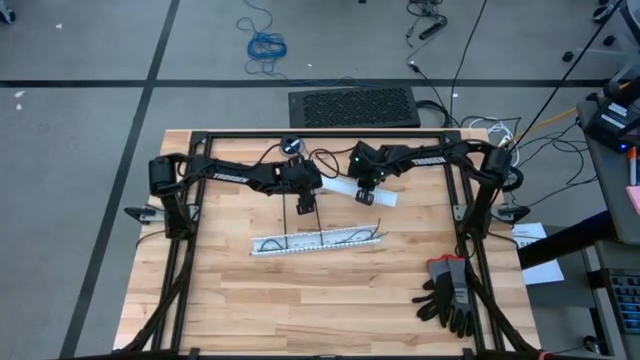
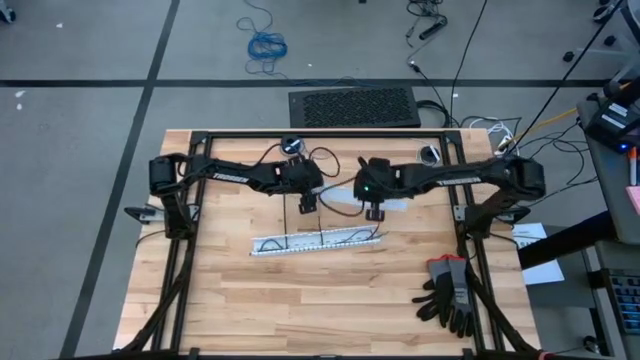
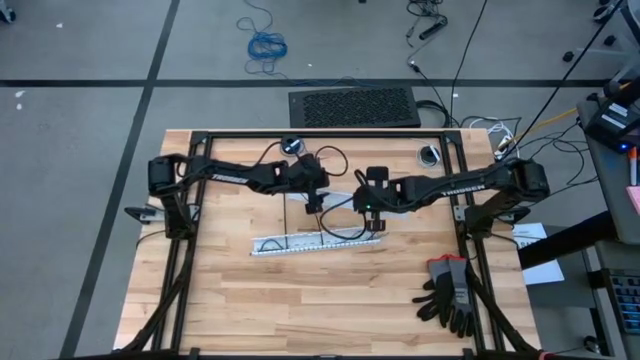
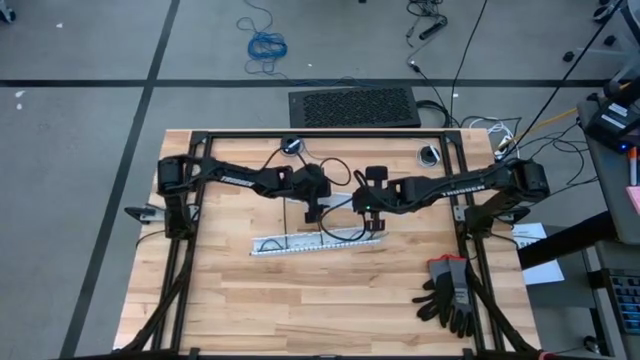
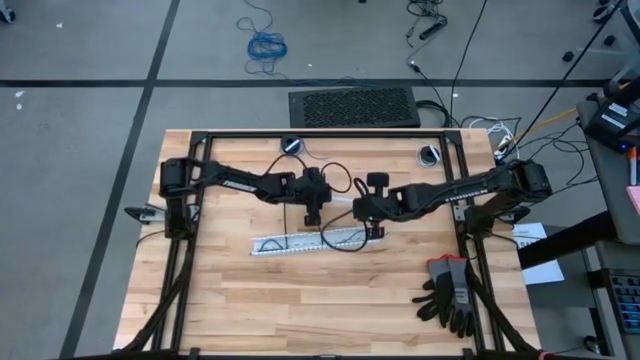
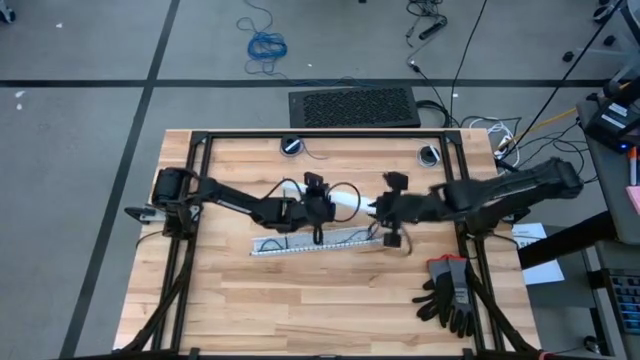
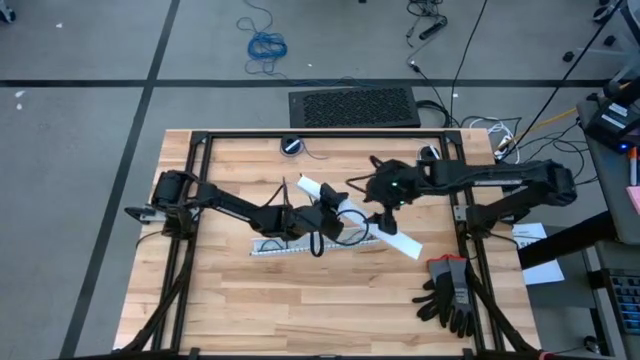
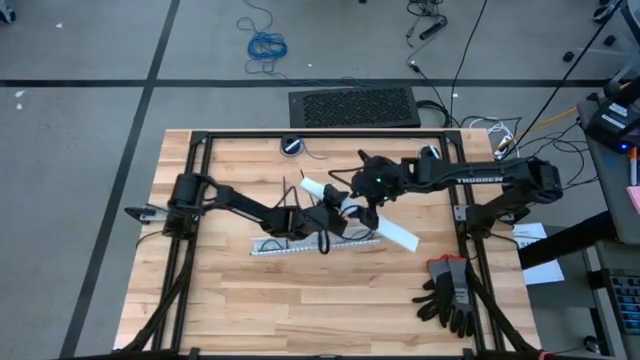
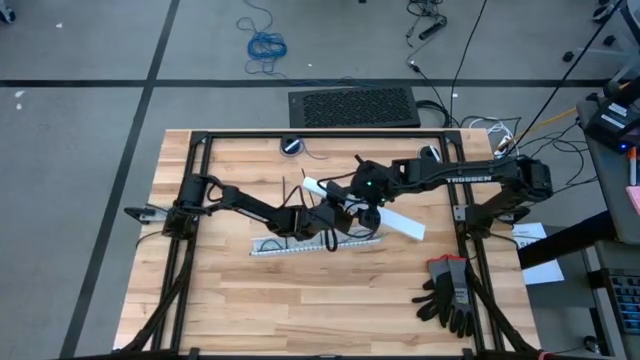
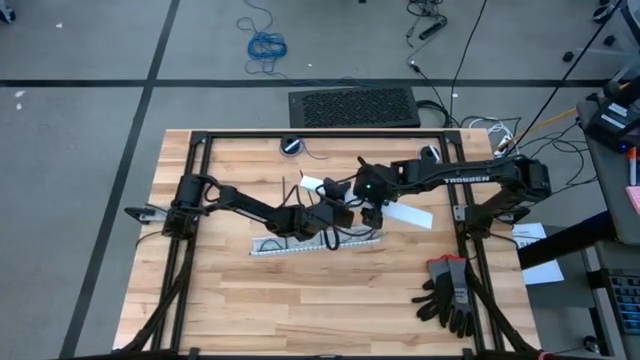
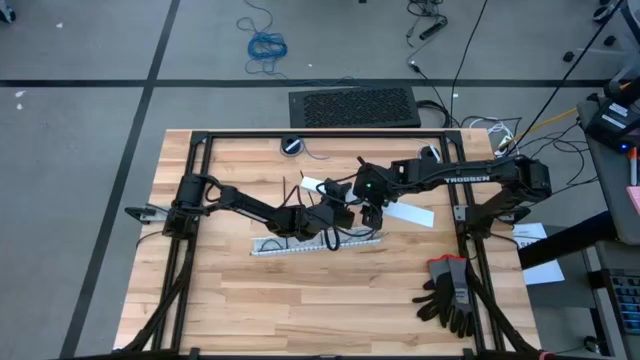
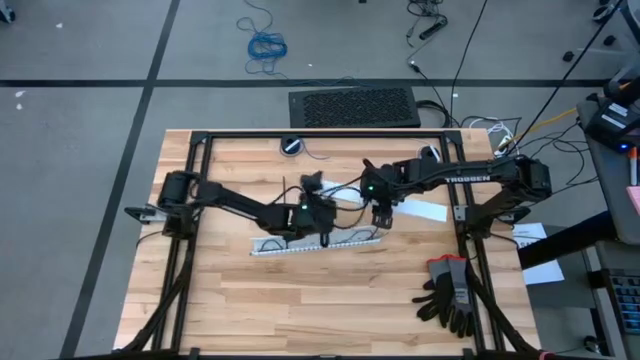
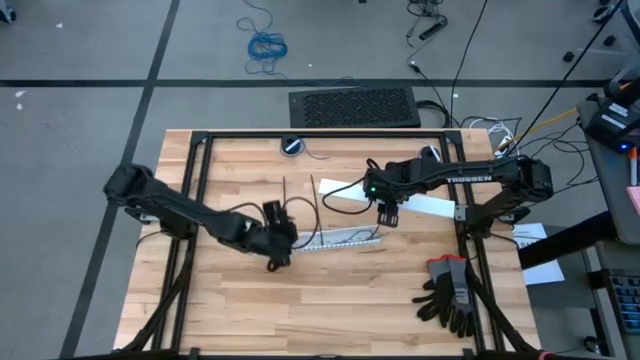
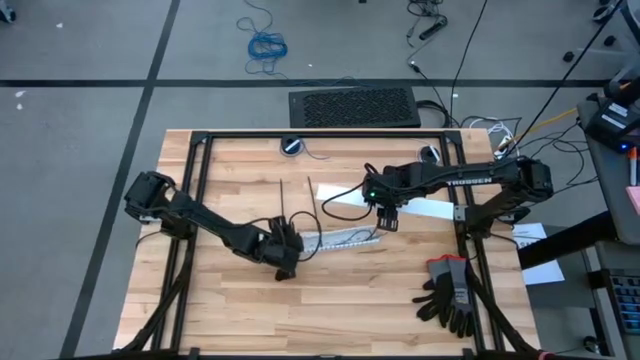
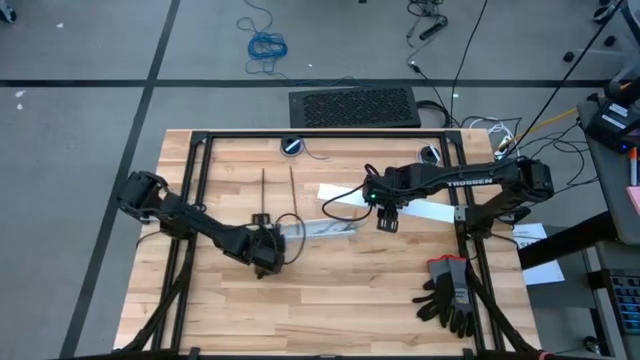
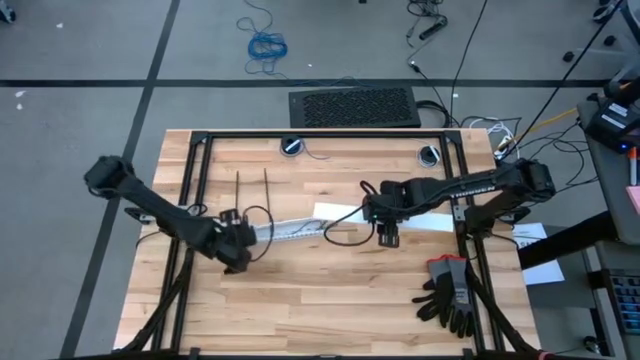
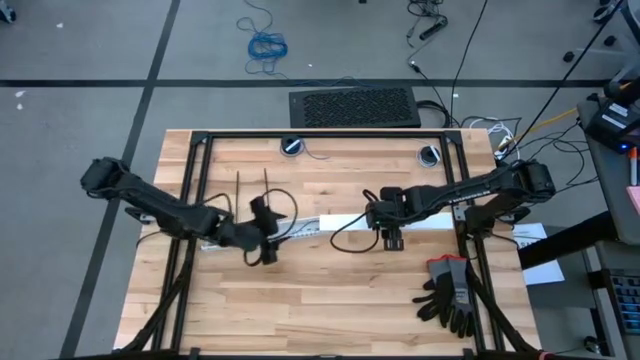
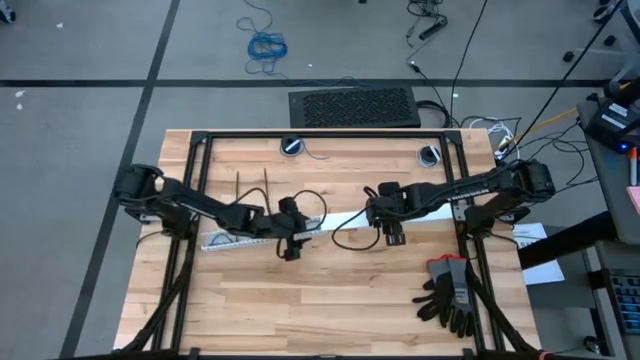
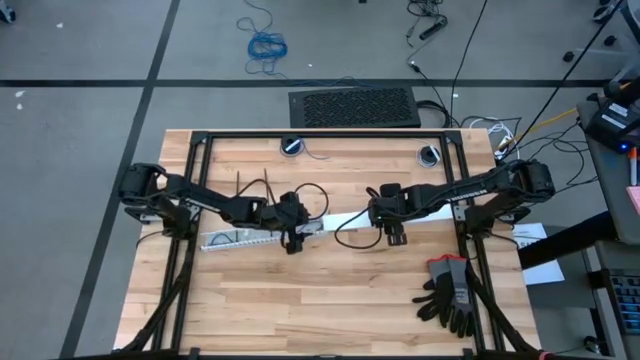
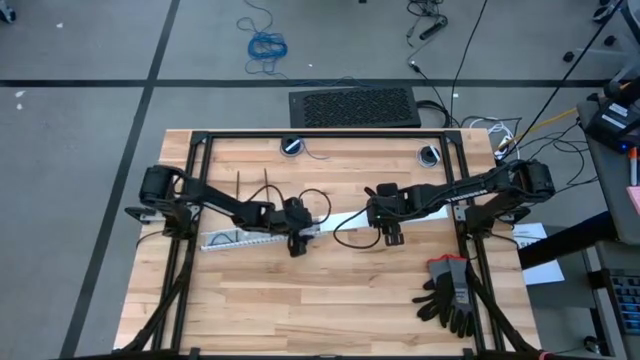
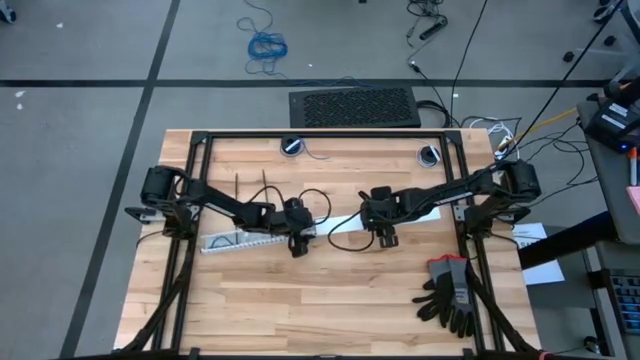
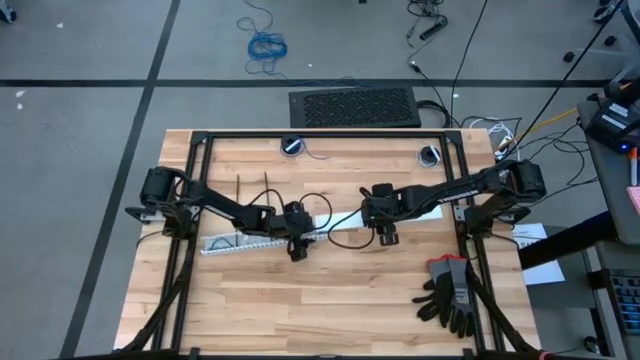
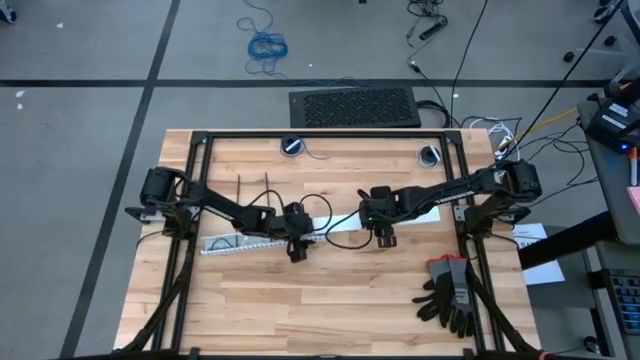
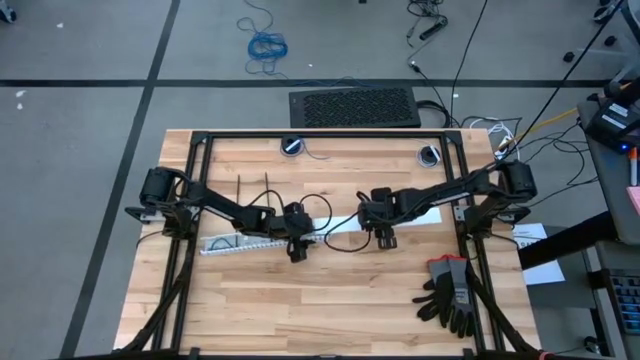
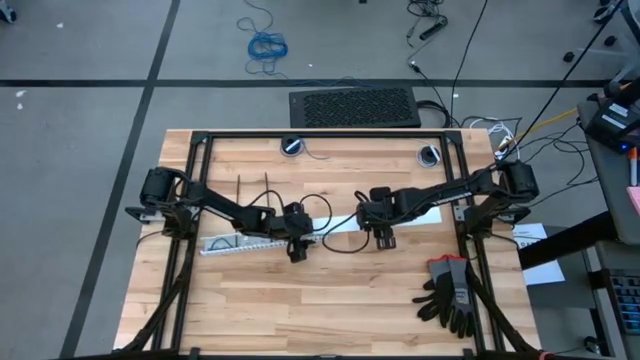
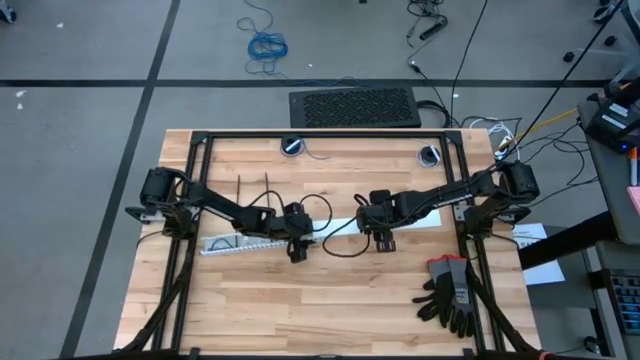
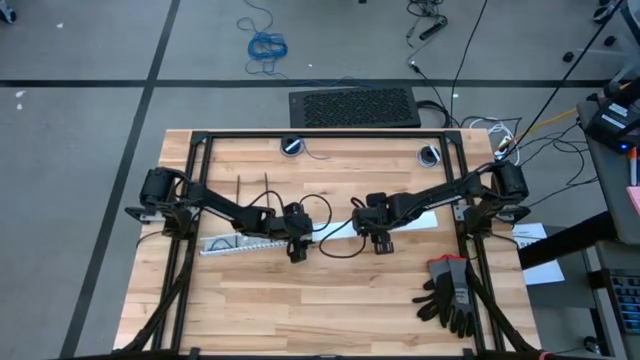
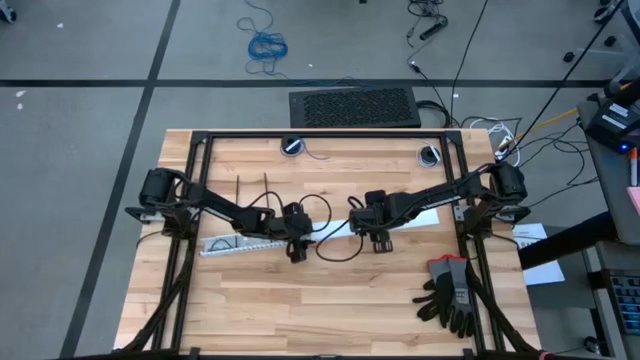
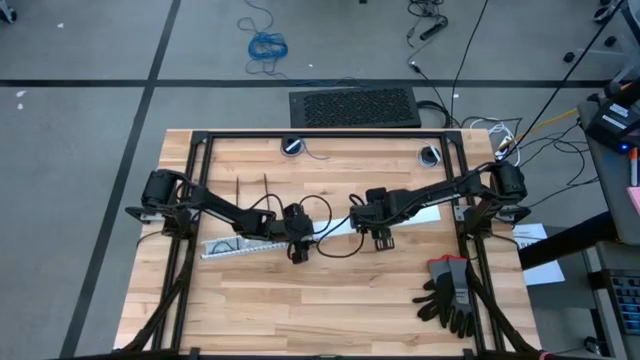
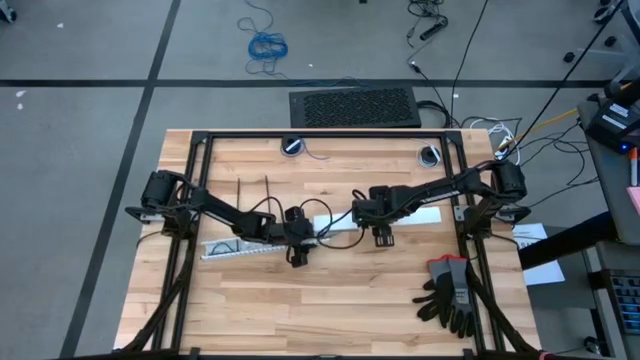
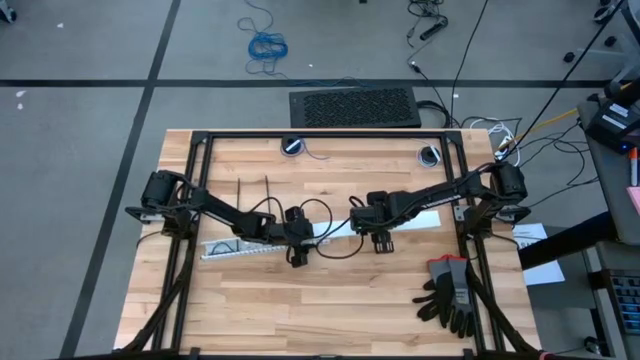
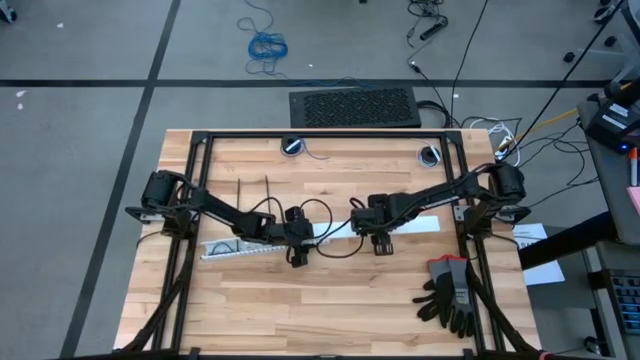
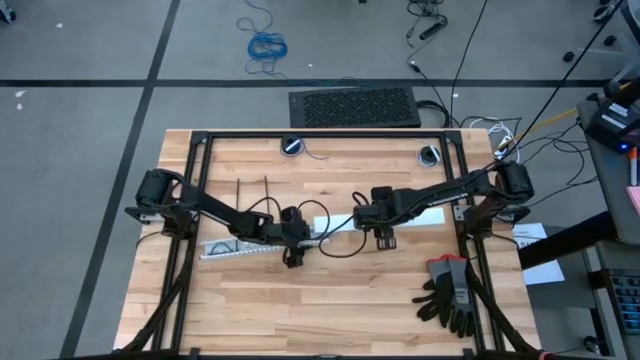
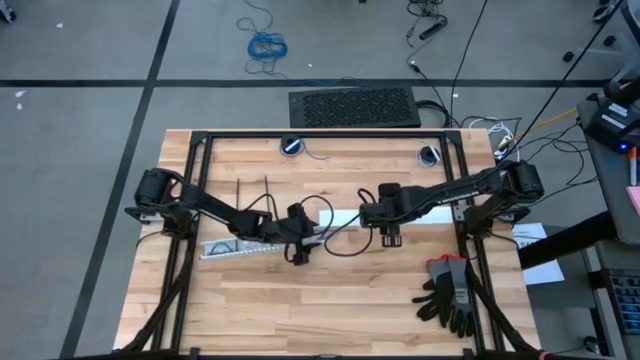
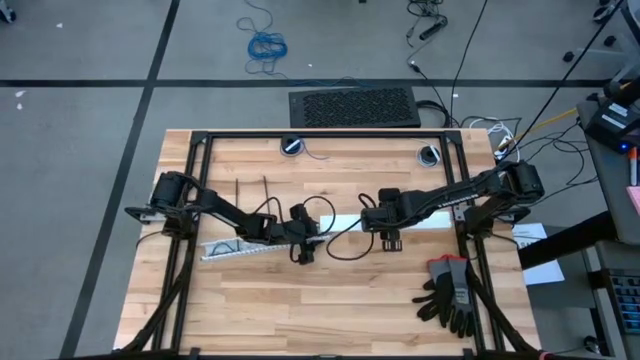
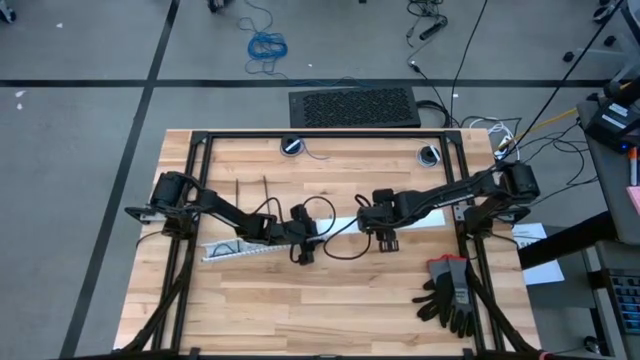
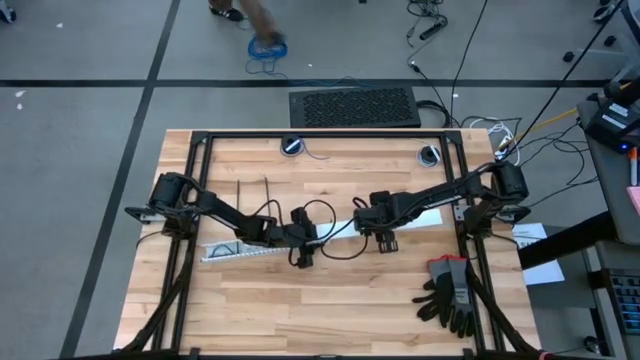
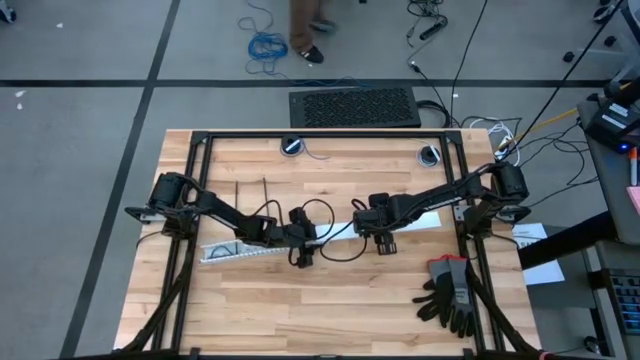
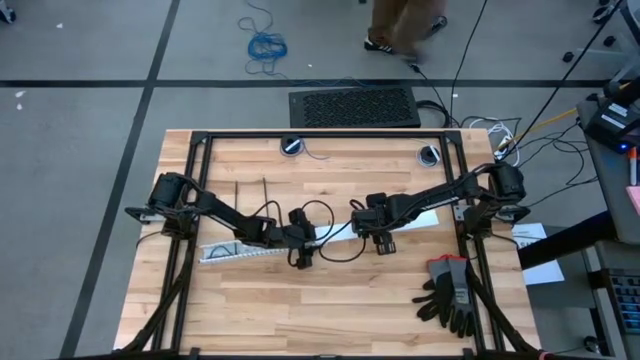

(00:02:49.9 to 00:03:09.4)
Task: Ziptie cables
Close the white cable duct

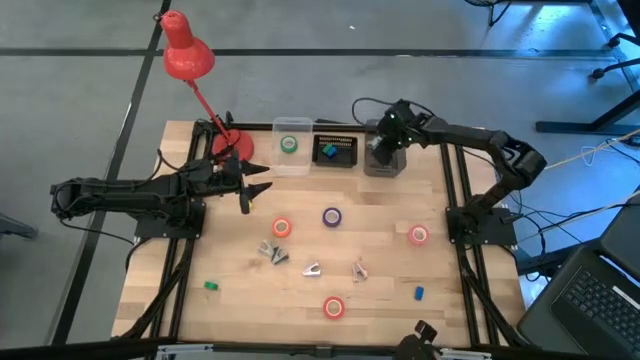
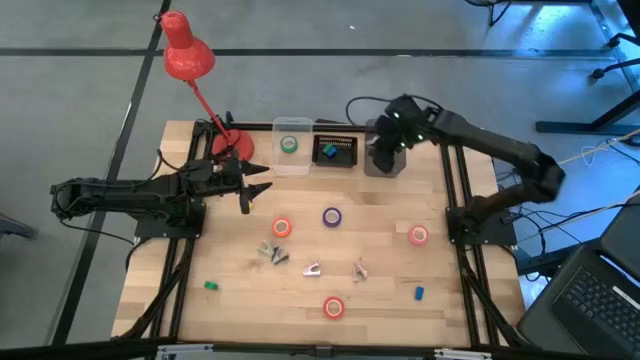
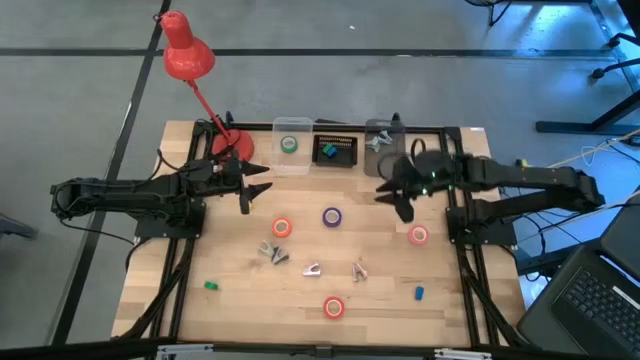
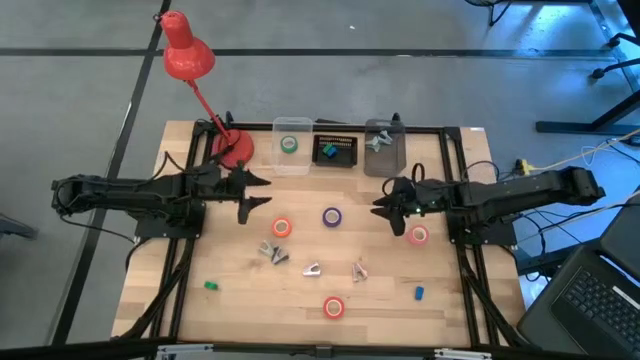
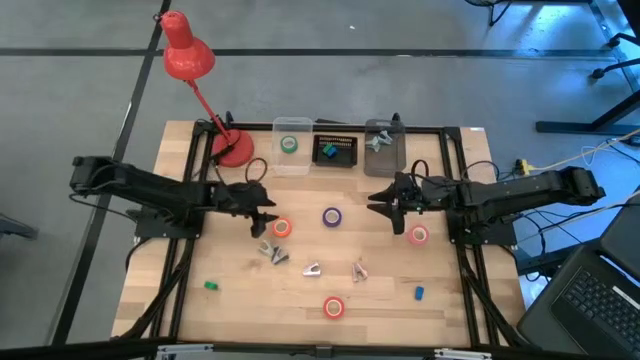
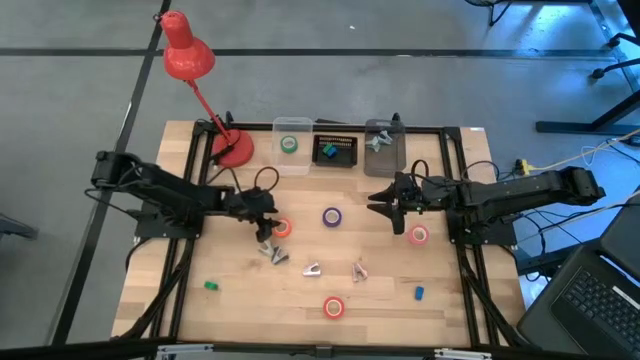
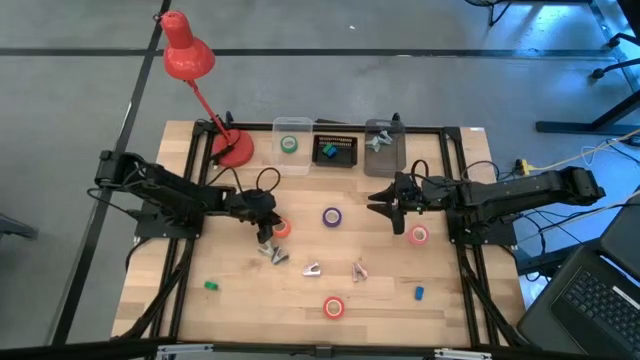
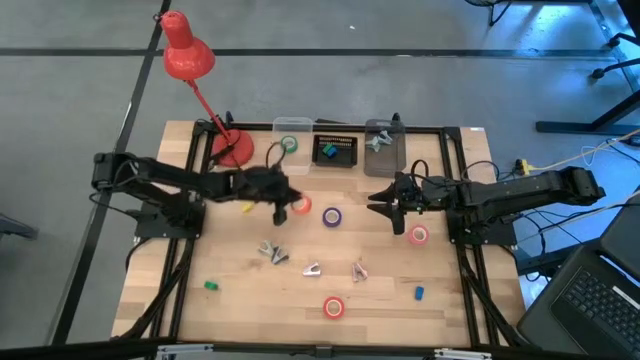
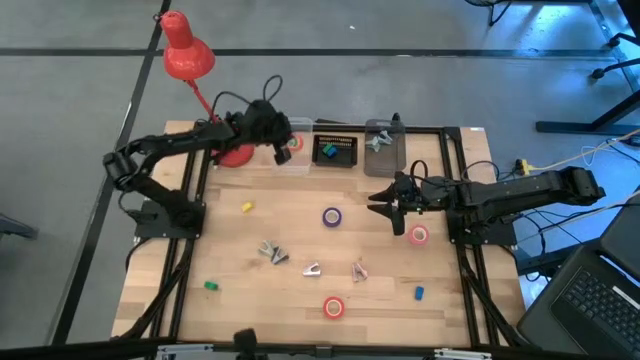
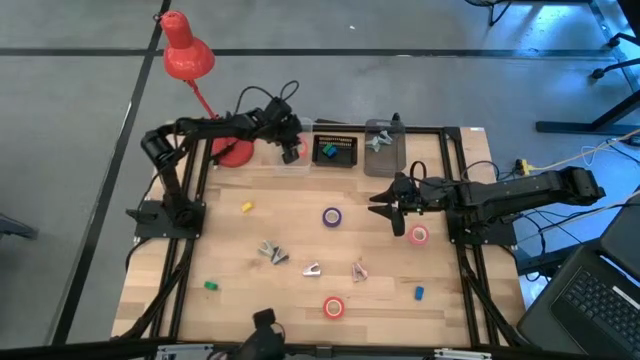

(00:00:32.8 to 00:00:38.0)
Task: Pick and place Stapler, Stapler remover, tape
Put the orange tape into the transparent bin
